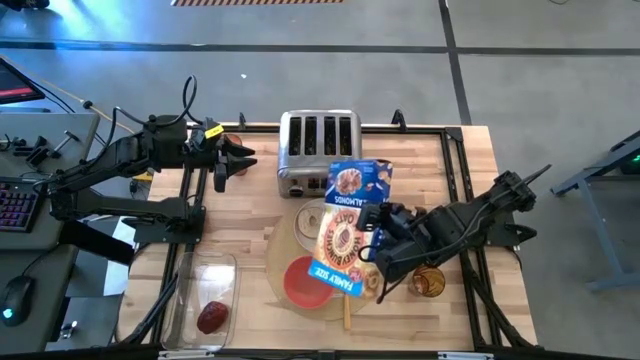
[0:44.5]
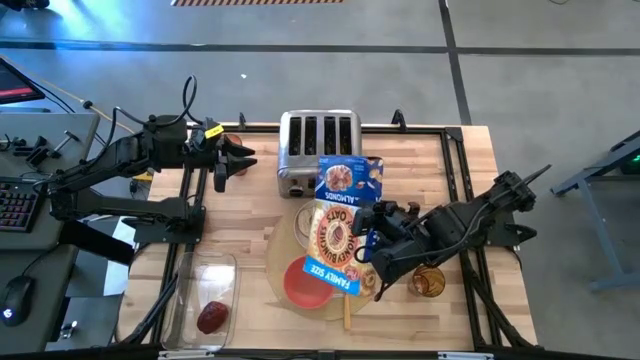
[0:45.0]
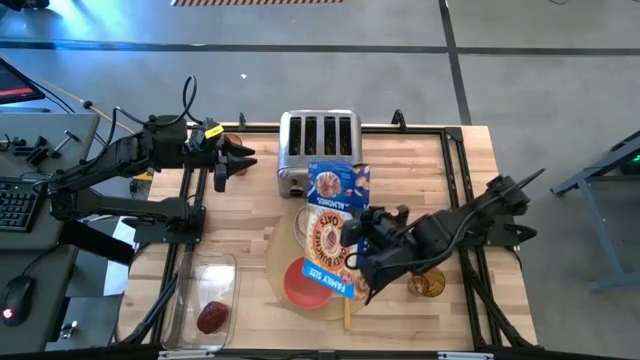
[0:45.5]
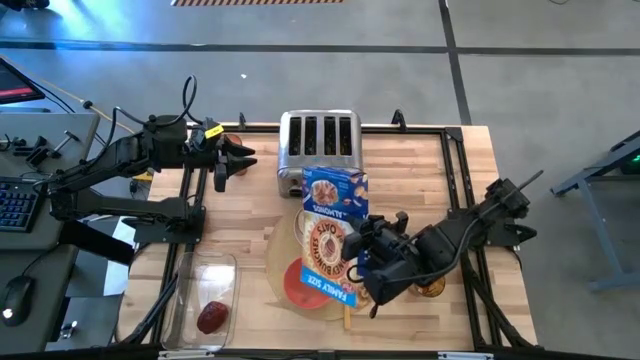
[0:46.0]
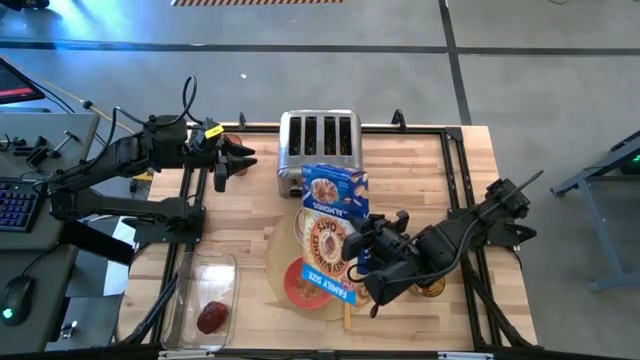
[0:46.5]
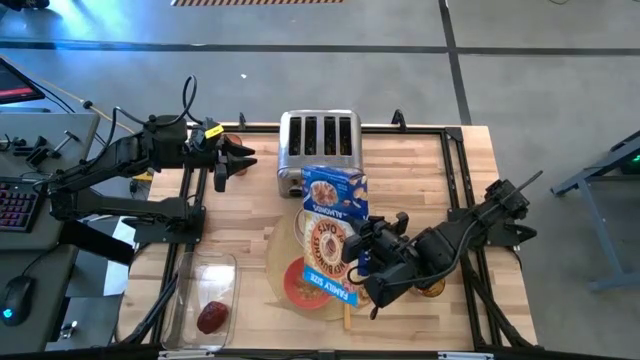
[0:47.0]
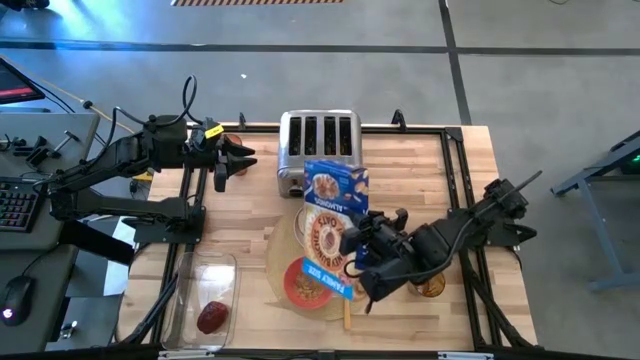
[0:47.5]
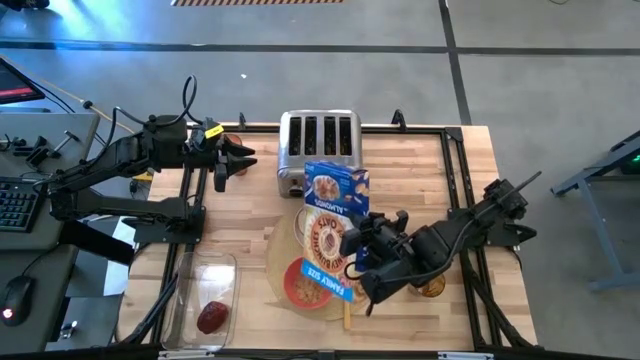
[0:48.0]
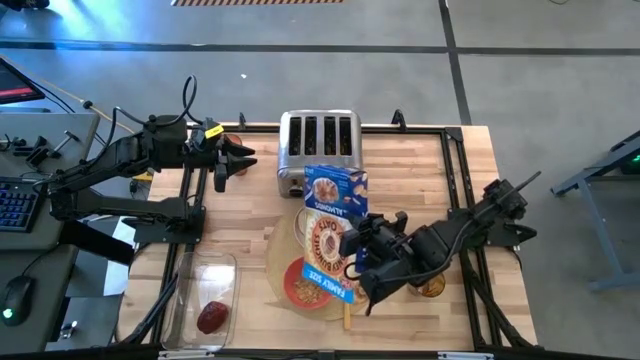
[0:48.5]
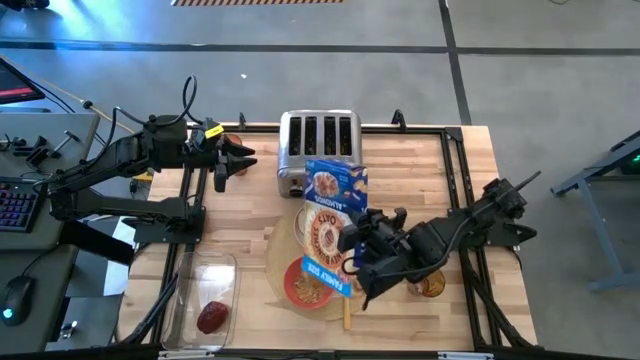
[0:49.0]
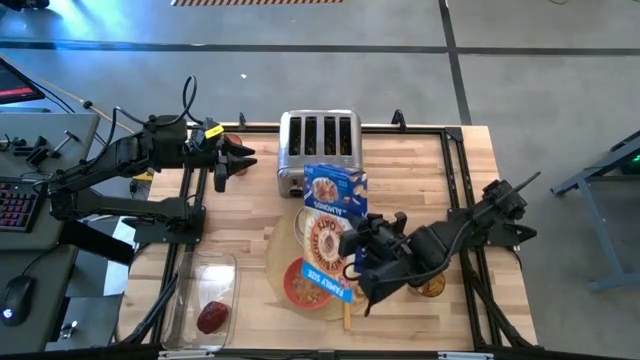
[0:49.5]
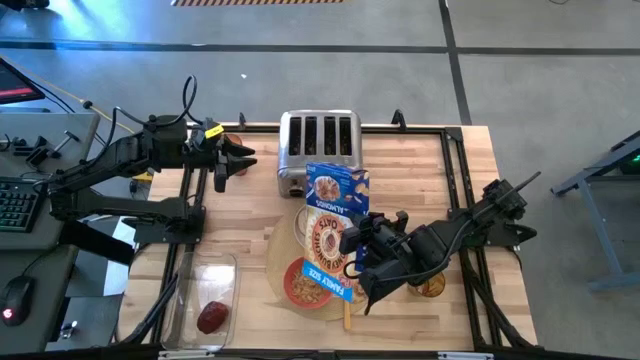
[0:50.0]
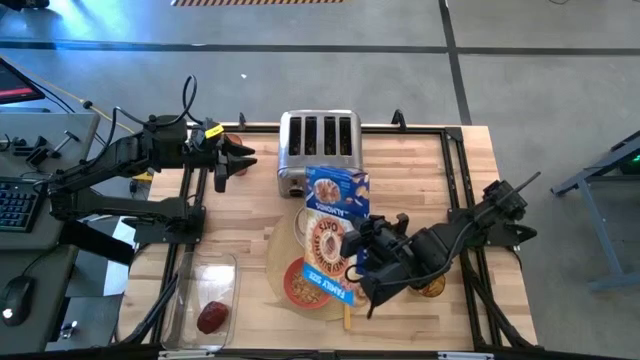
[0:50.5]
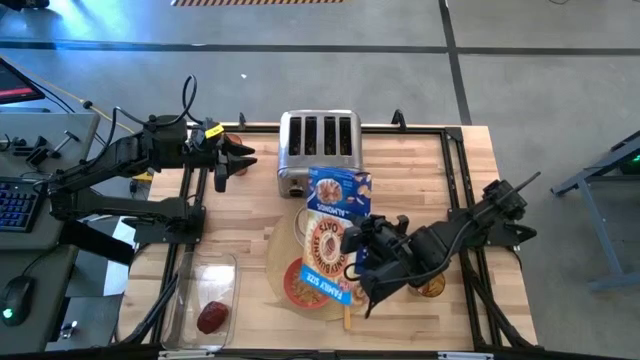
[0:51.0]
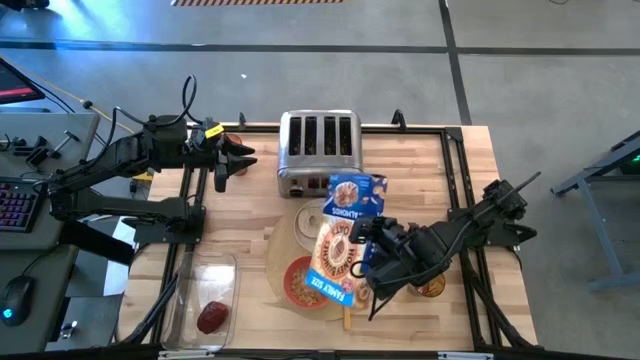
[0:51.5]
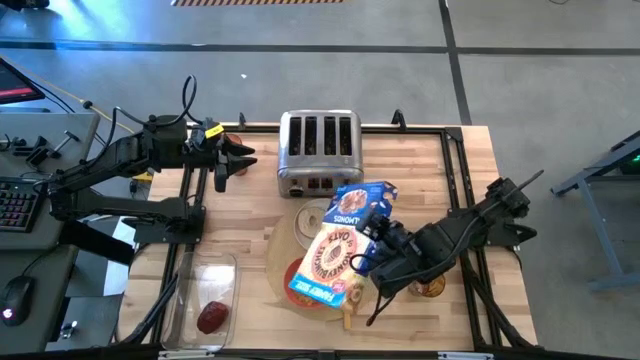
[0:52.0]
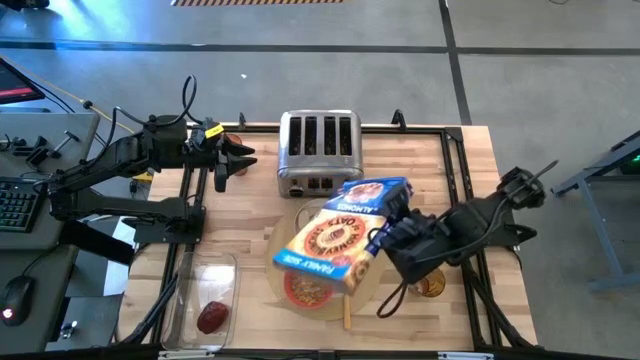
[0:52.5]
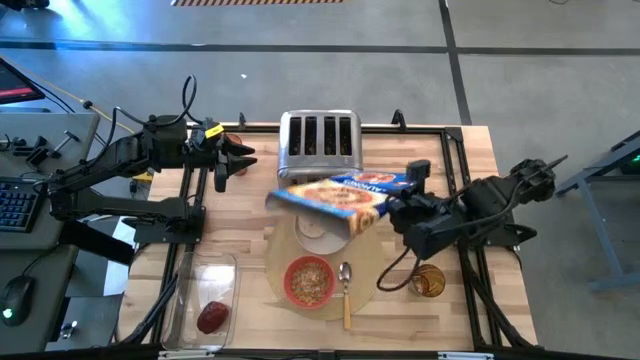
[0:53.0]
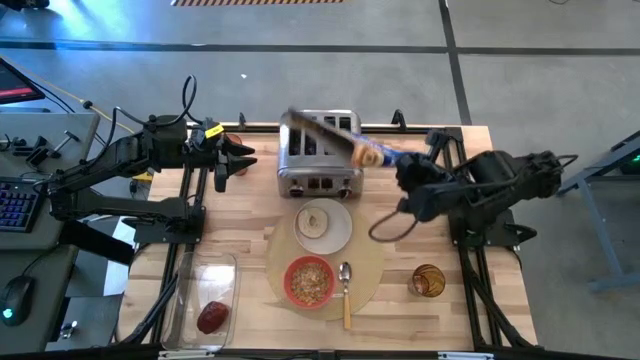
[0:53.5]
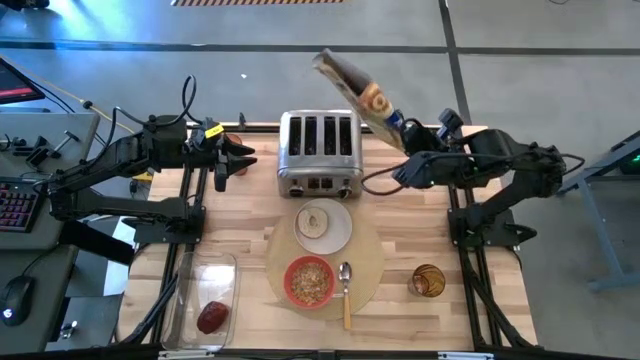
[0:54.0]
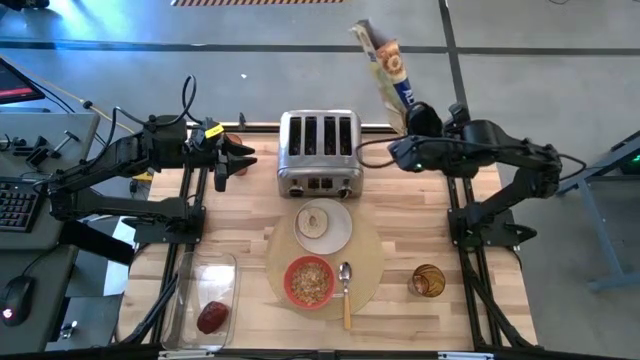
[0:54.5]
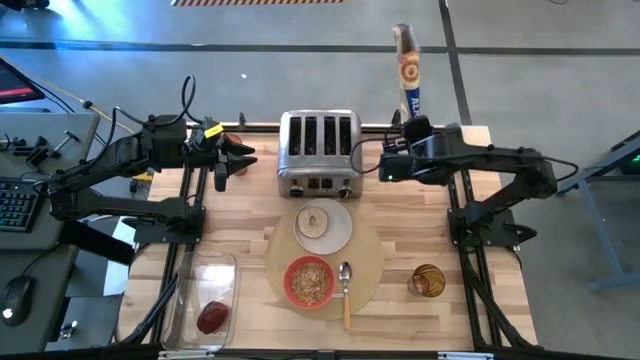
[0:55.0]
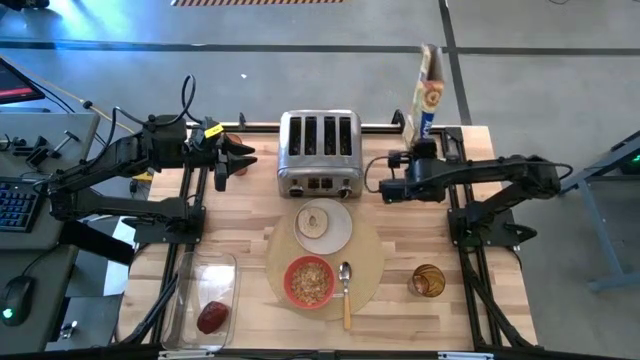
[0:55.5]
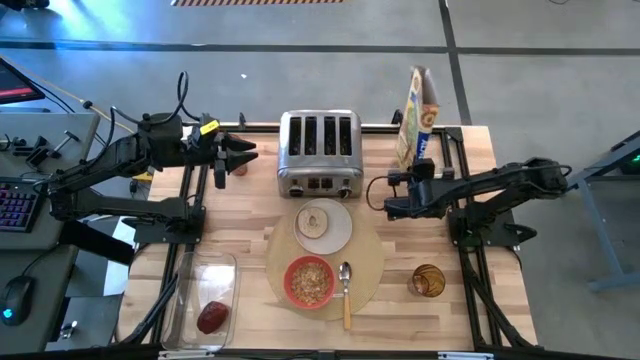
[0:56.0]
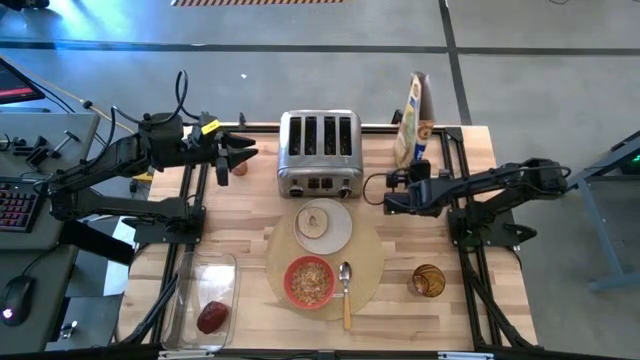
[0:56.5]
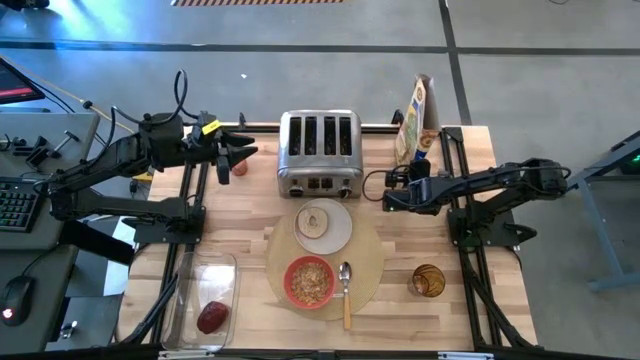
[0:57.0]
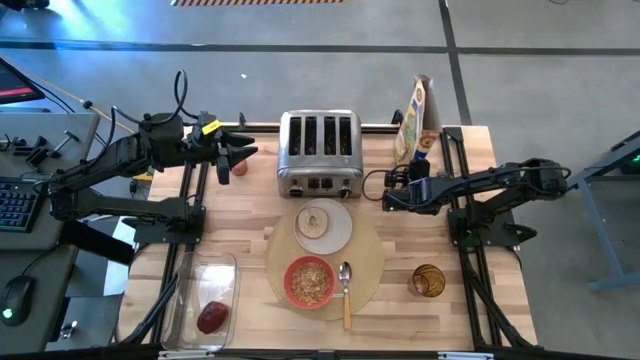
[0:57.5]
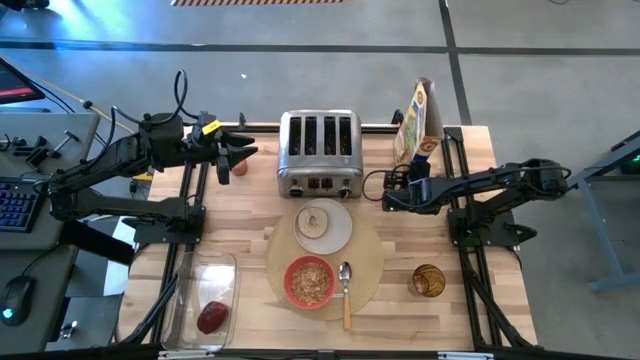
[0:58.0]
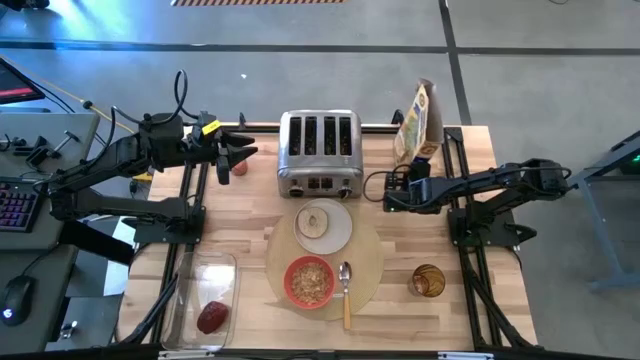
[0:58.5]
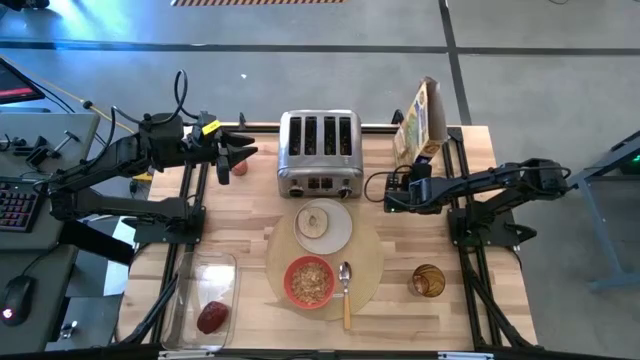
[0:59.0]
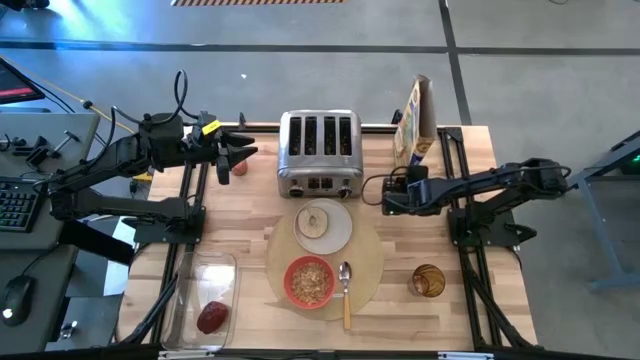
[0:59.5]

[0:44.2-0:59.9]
Task: Arrange a breakfast setting
Pour the cereal into the bowl

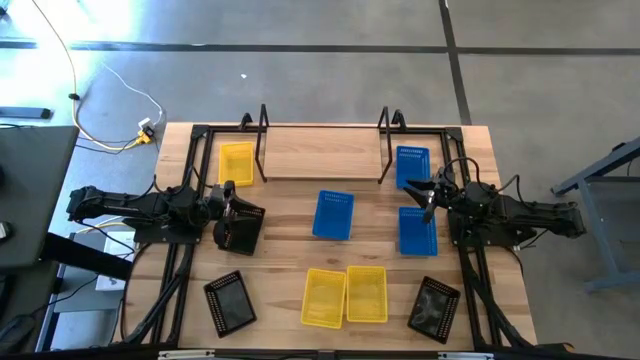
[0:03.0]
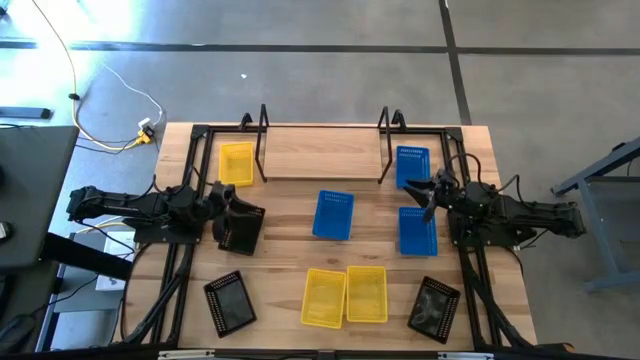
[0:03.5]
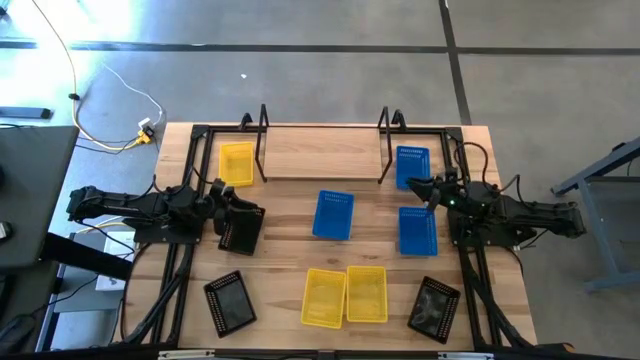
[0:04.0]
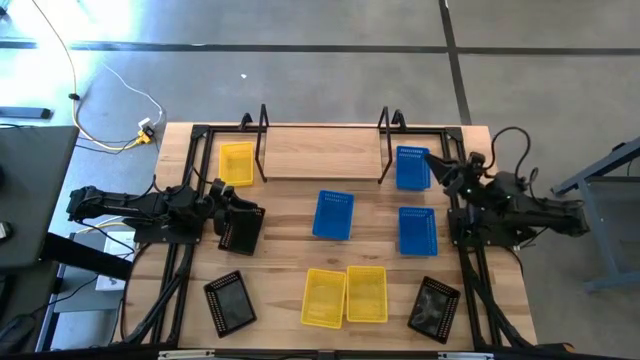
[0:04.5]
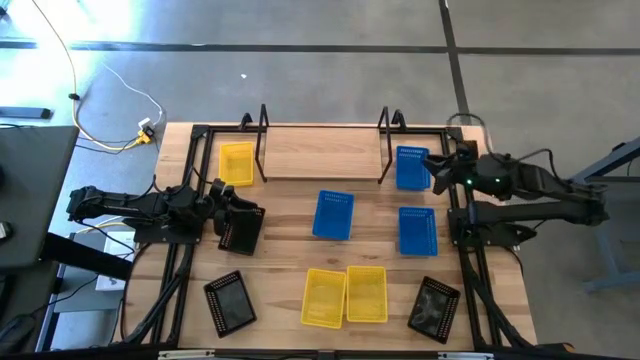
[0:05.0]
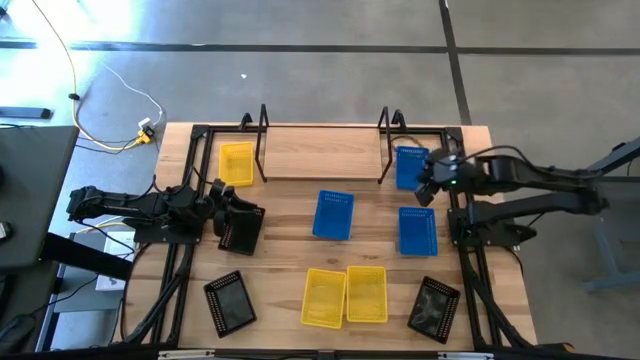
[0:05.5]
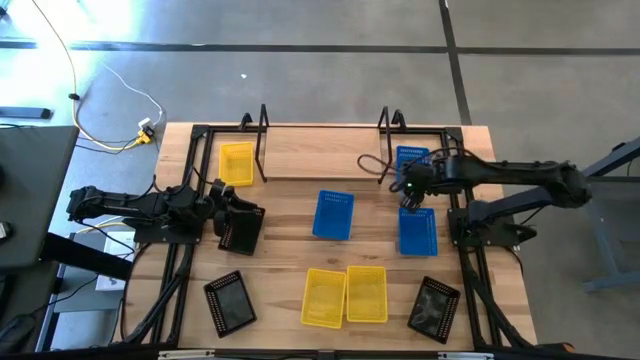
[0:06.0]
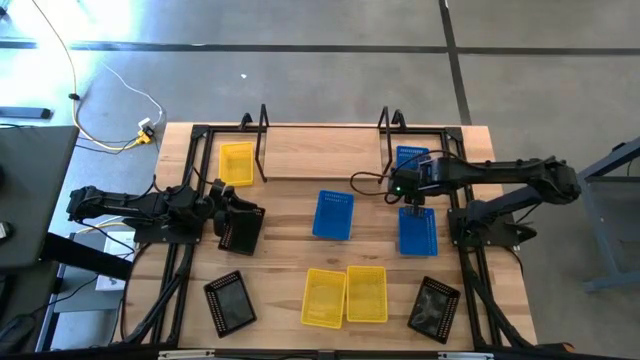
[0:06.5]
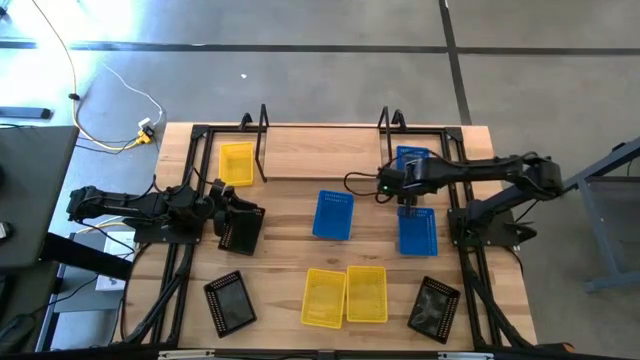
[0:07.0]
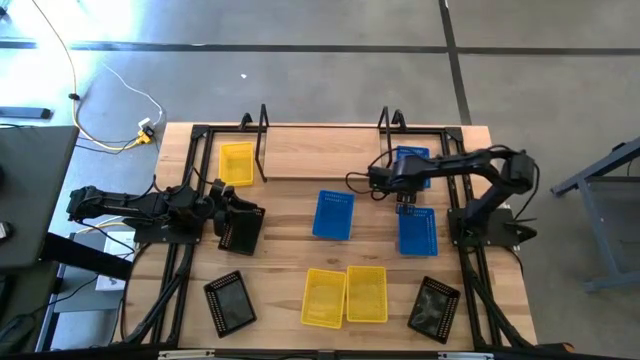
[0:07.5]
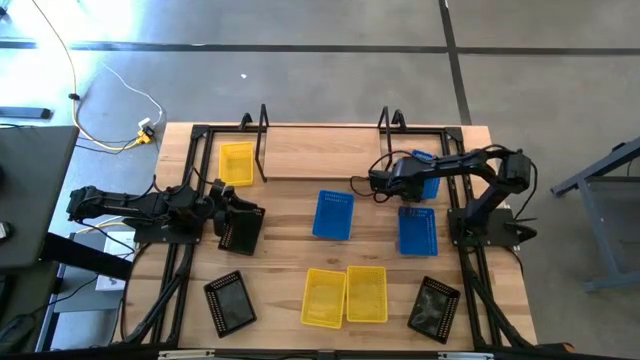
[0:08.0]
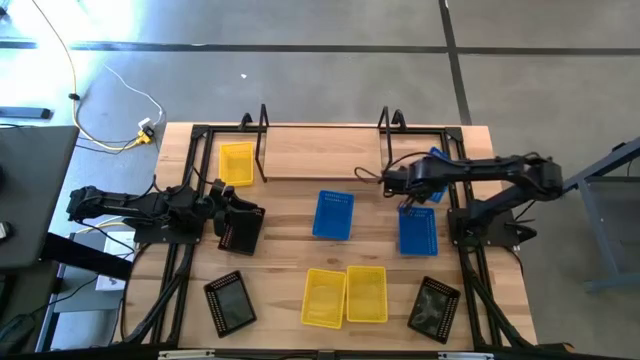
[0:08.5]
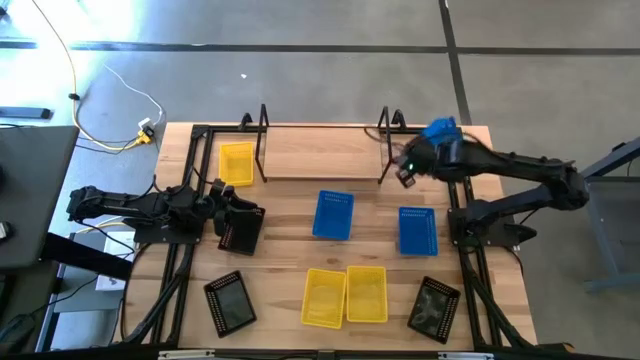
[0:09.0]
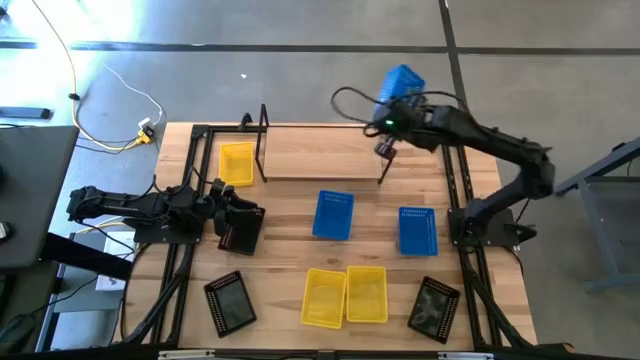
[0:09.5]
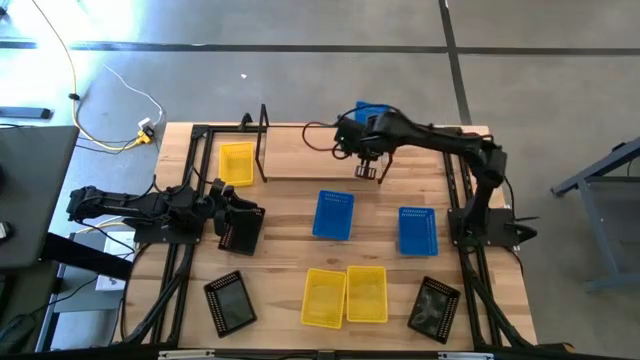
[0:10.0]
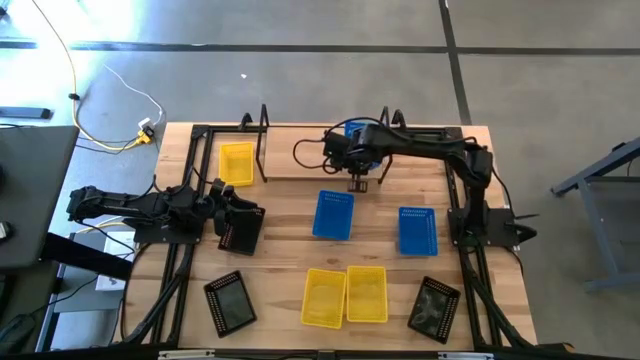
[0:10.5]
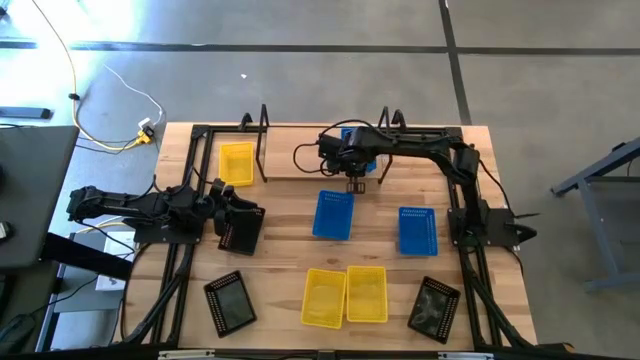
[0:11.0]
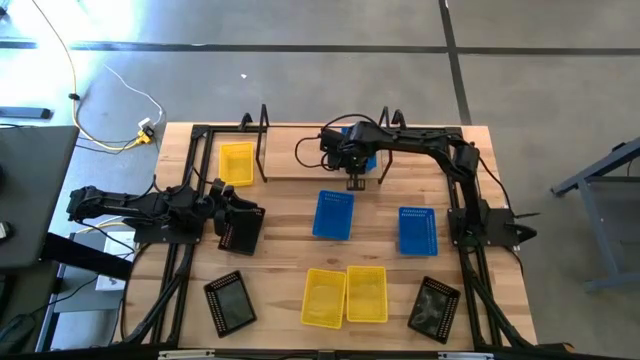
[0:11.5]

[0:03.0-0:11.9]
Task: Stack baskets on shelf by color
Put the top right blue bin on the shelf
